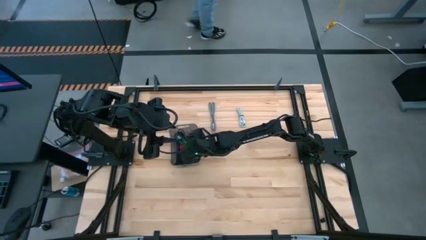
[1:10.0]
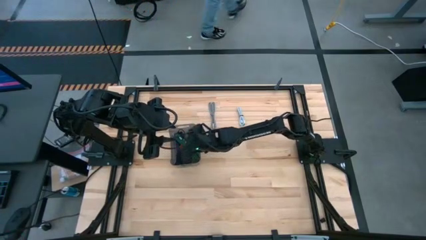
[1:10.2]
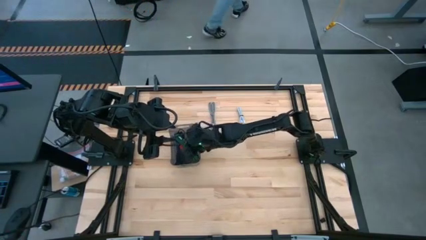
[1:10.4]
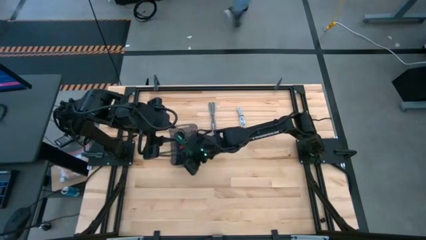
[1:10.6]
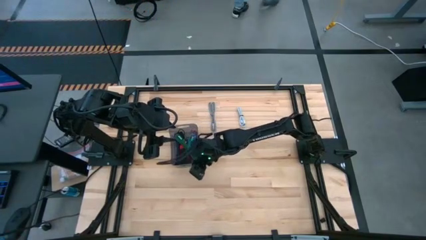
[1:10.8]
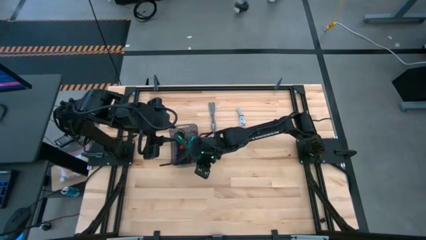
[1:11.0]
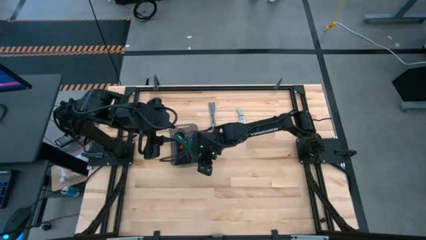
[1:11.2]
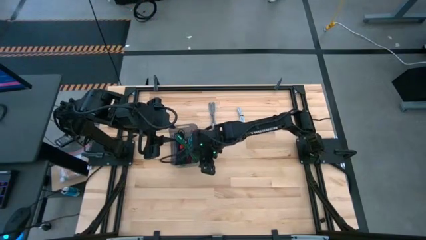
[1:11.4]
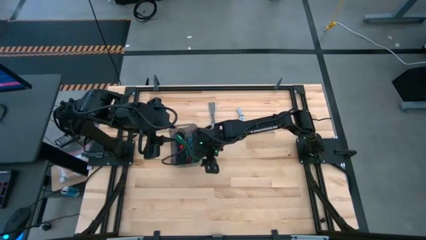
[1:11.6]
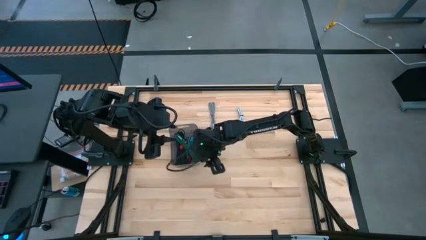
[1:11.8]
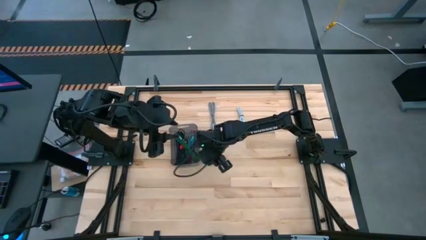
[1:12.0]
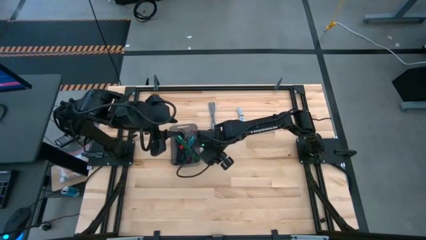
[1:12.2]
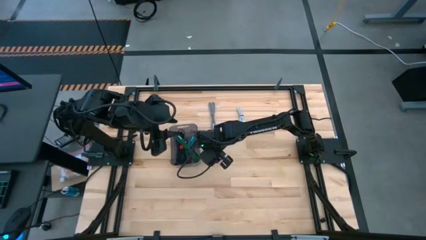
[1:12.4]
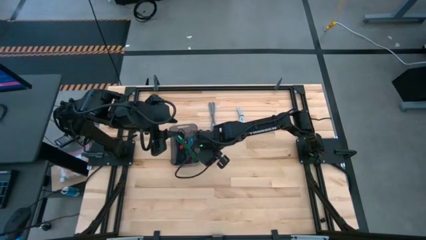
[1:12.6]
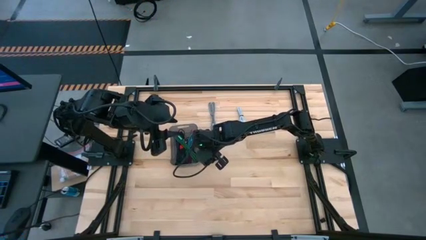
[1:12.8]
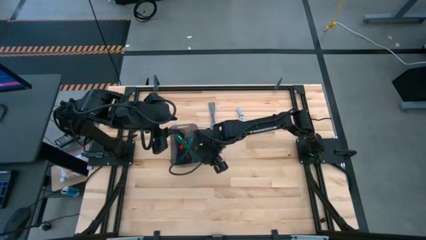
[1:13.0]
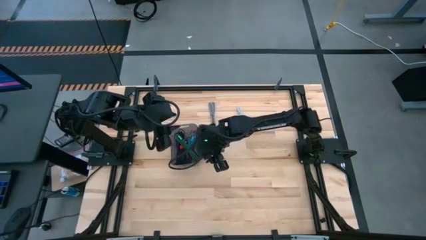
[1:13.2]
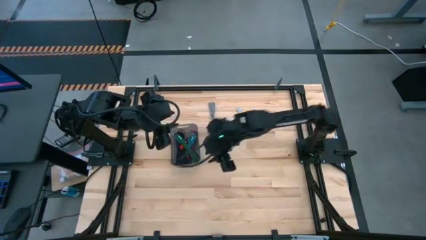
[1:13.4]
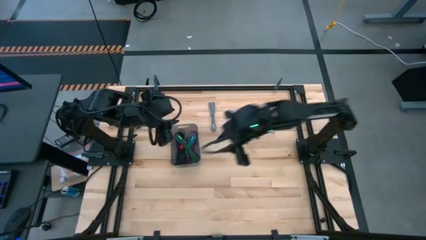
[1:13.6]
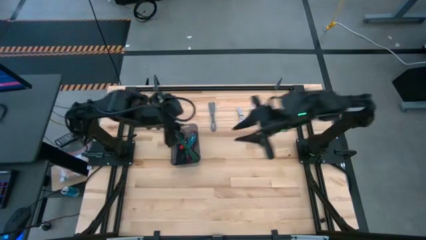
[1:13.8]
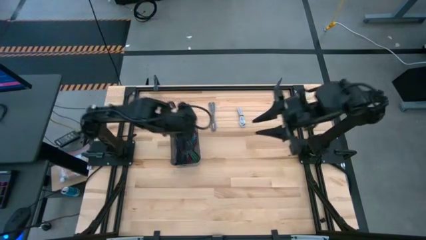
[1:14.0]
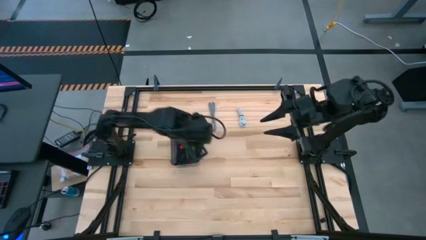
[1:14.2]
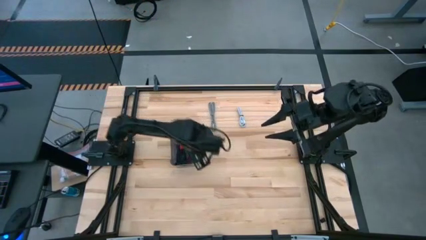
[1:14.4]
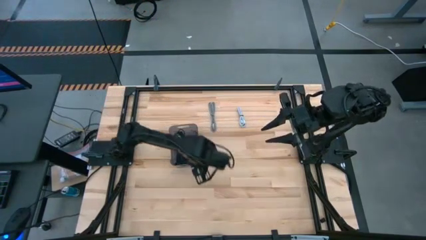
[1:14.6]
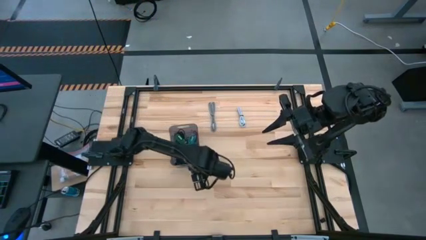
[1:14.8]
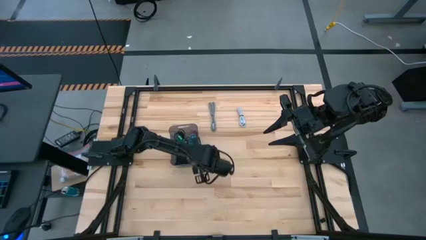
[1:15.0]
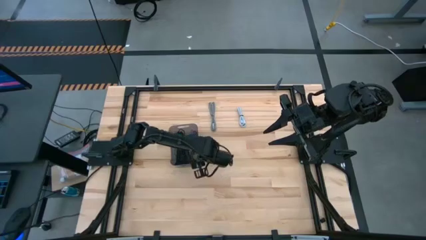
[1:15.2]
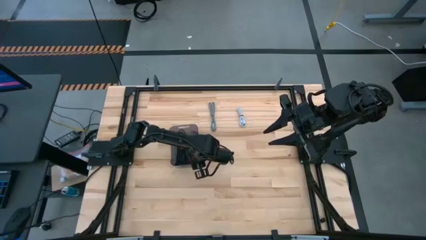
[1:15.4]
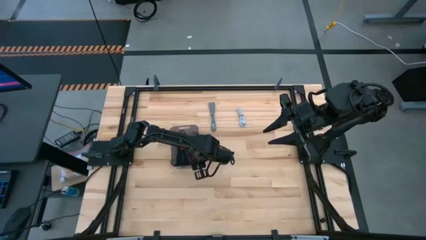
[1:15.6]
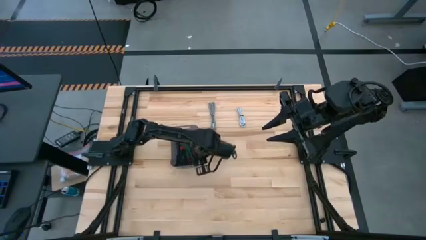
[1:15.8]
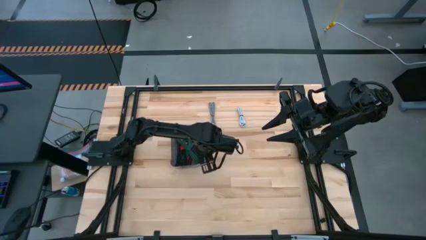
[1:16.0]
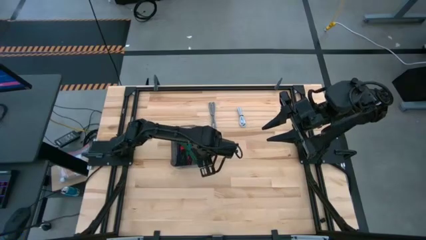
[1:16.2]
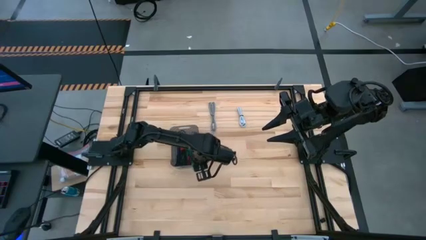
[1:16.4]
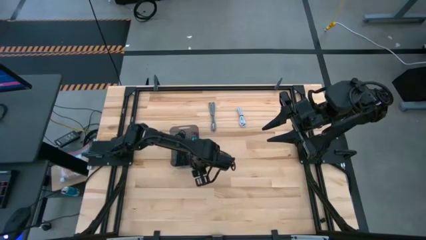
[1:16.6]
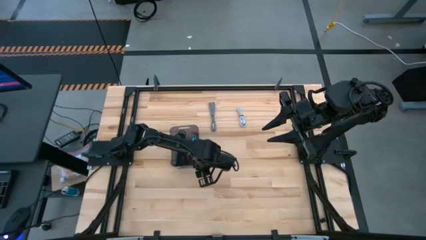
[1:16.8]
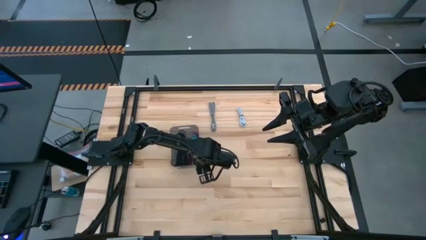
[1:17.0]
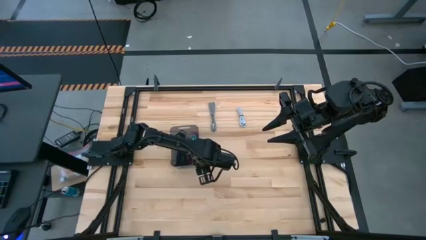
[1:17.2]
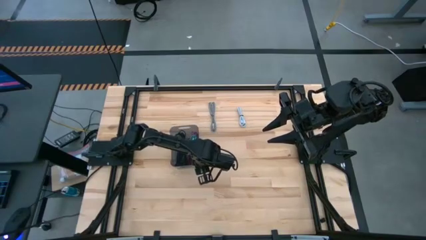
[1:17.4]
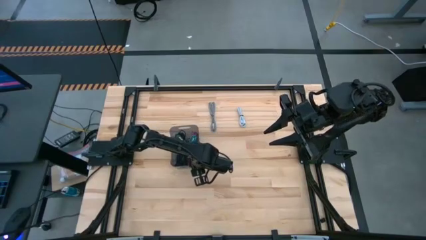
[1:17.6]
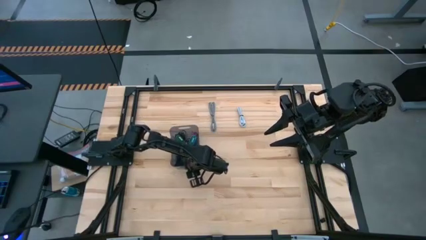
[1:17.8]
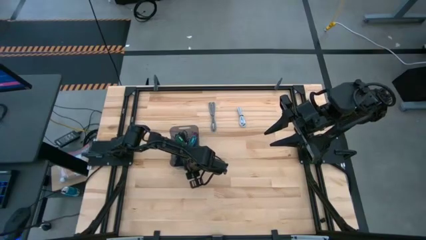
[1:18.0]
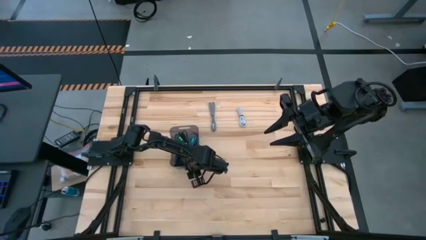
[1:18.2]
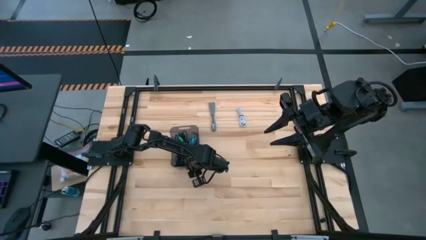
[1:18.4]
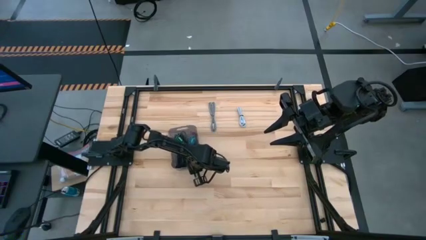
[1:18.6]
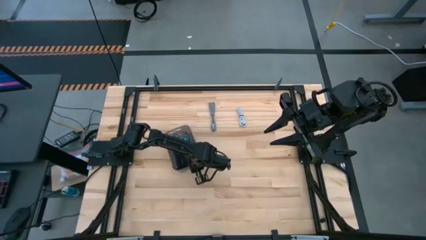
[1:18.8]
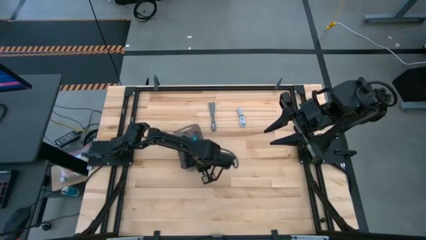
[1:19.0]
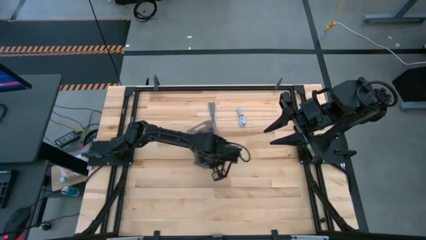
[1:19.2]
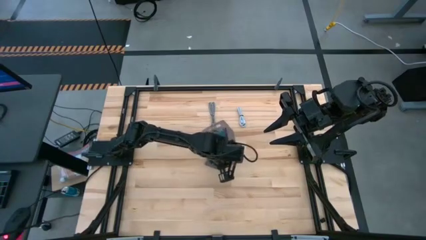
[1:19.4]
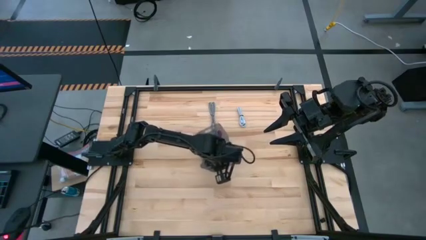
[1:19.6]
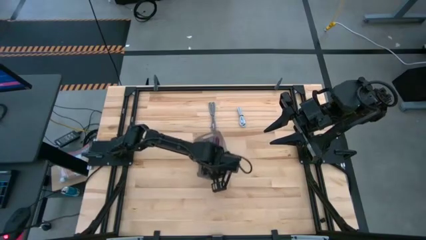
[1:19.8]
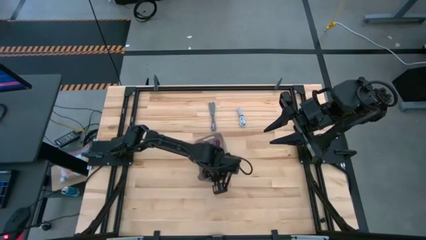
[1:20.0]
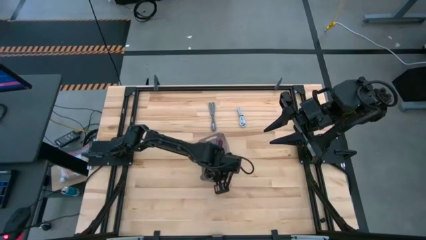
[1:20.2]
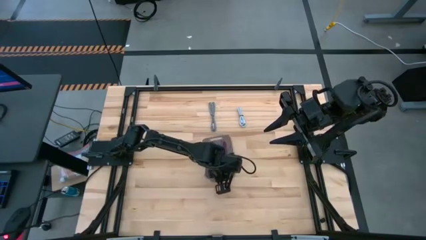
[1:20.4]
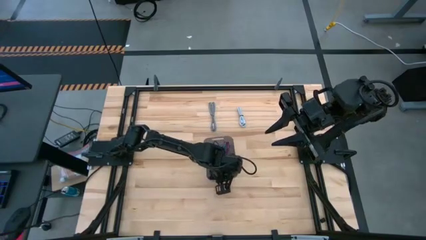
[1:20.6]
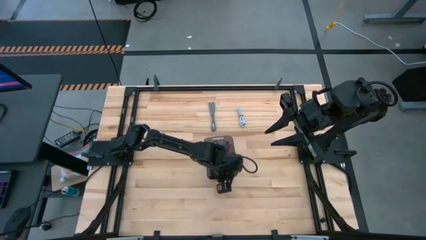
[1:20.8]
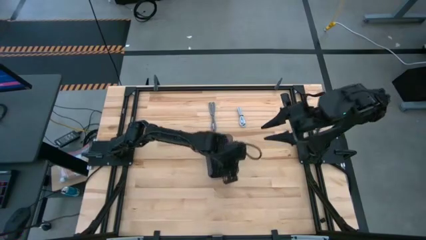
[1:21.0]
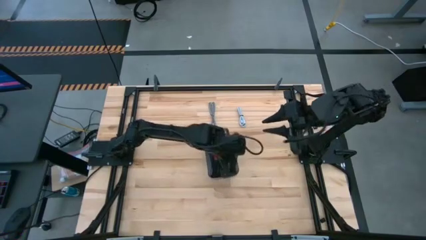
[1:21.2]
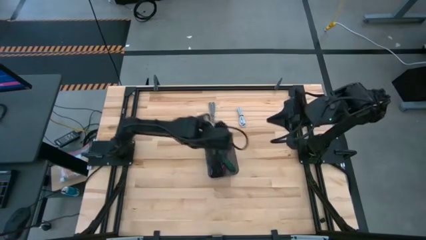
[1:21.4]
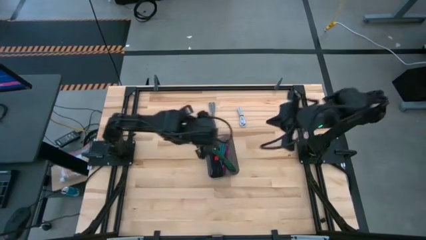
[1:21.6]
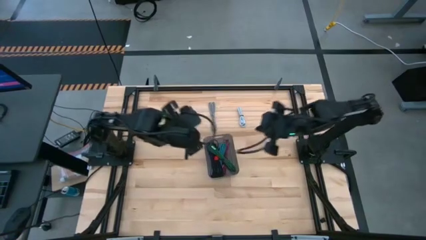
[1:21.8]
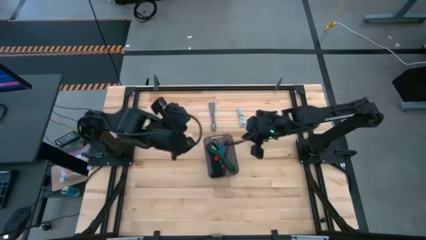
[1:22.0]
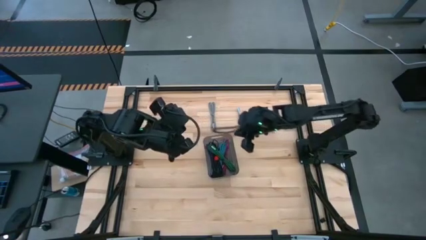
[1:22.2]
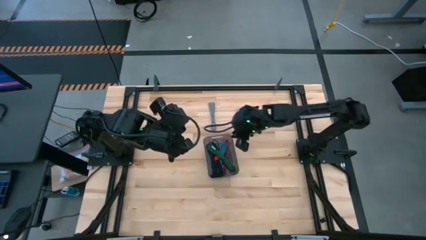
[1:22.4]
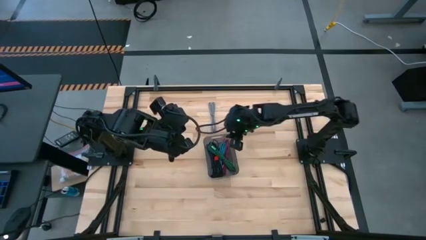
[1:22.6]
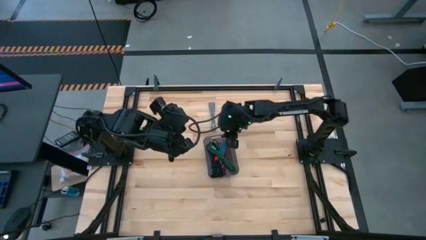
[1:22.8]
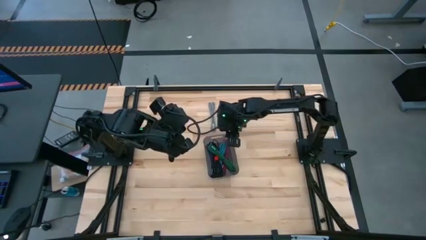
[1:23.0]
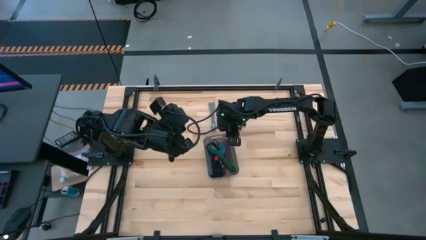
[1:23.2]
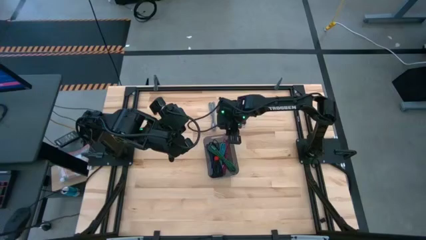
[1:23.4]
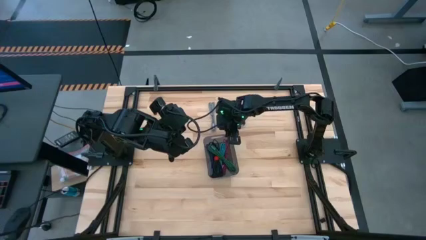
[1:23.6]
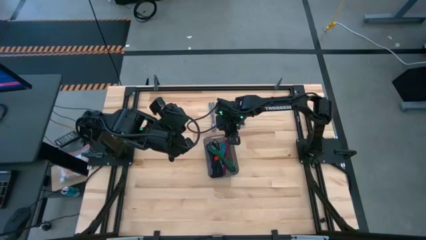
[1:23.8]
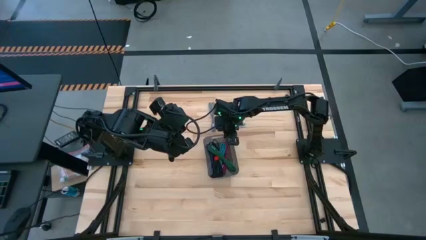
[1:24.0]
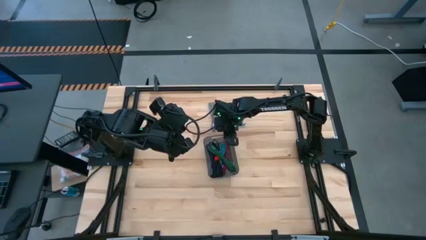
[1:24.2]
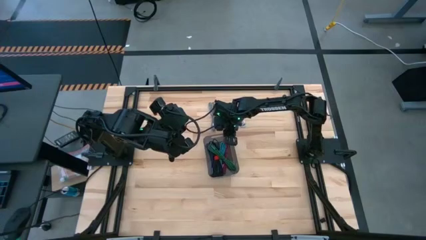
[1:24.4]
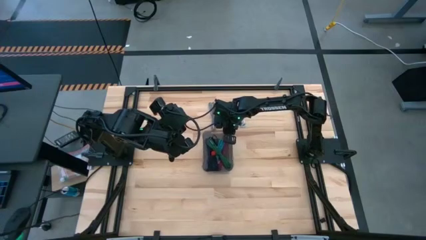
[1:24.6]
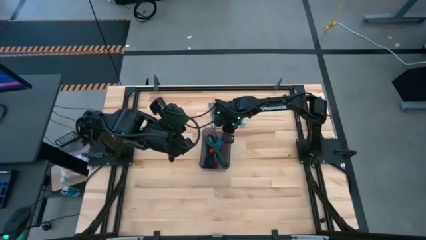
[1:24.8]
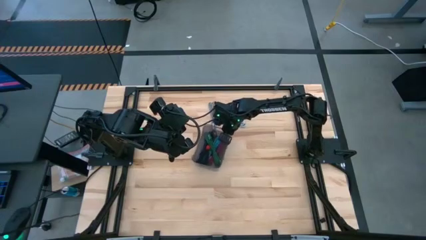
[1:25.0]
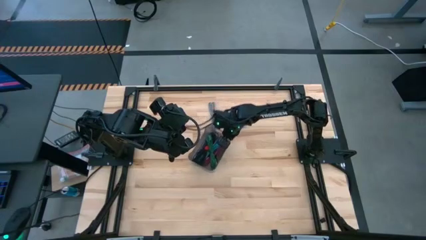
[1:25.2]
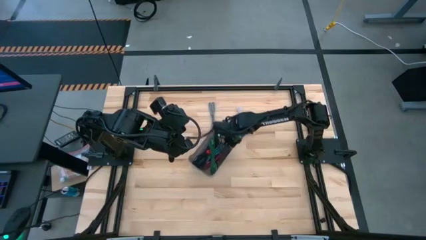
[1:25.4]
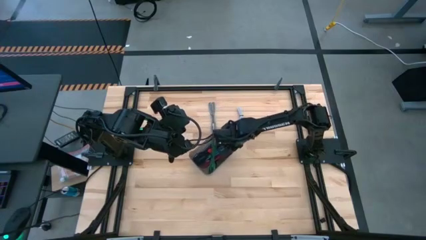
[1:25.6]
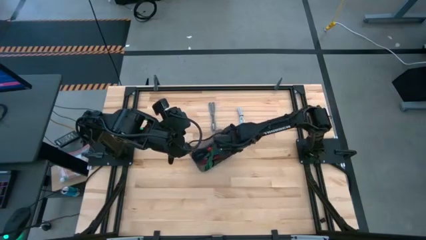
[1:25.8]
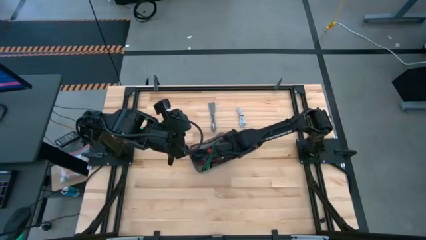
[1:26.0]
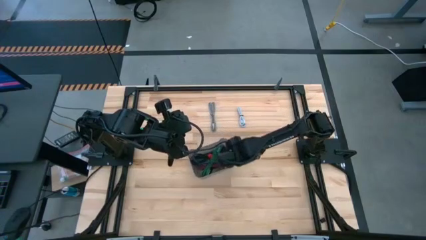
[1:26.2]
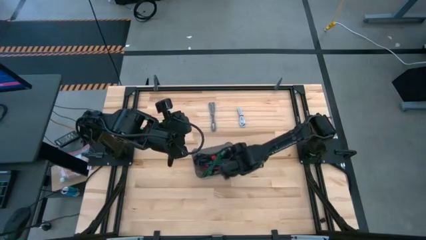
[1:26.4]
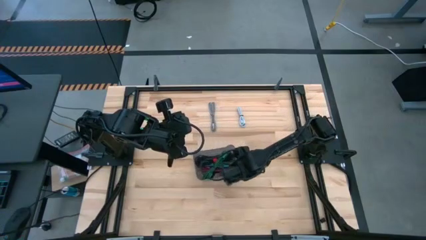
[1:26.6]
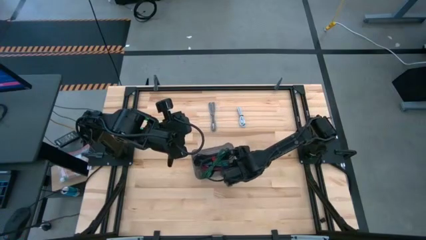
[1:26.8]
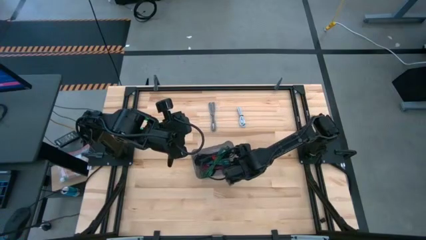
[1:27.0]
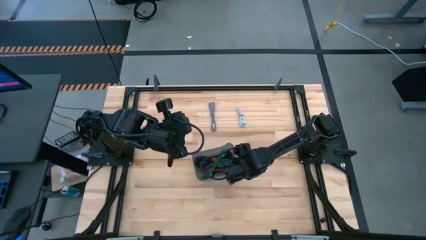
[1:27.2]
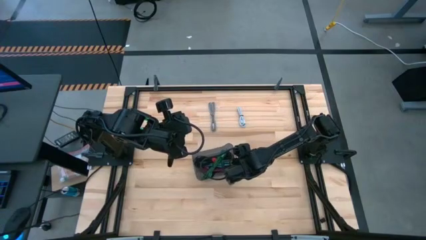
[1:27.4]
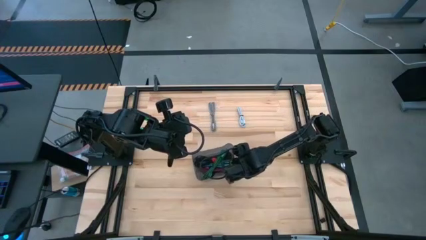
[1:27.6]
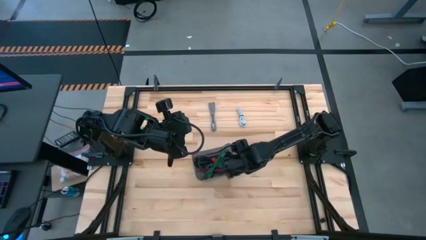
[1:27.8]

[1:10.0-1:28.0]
Task: Pick and place USB-C Cables
Adjust the black bin
